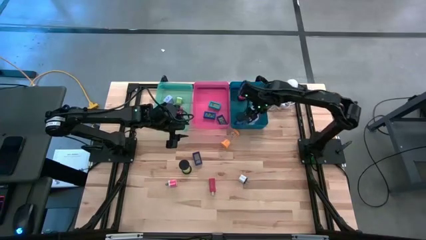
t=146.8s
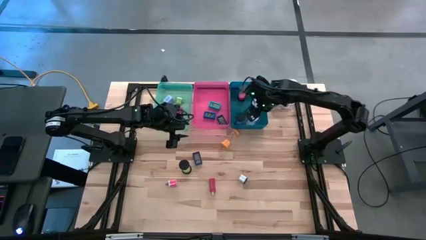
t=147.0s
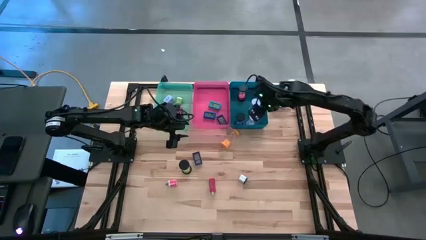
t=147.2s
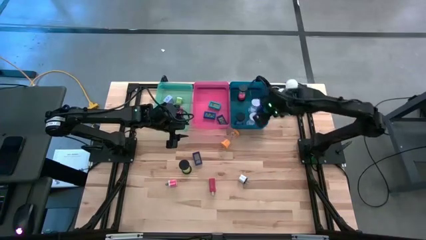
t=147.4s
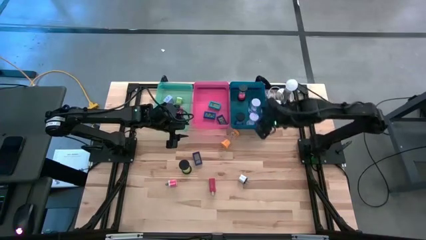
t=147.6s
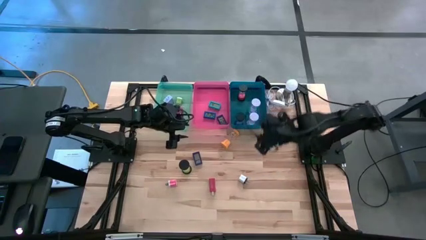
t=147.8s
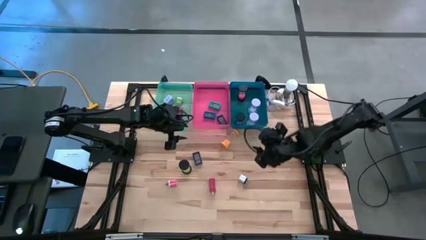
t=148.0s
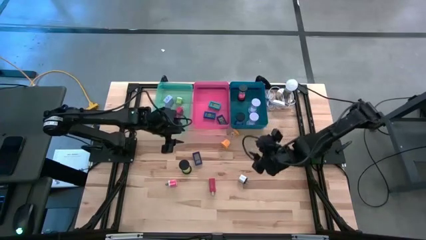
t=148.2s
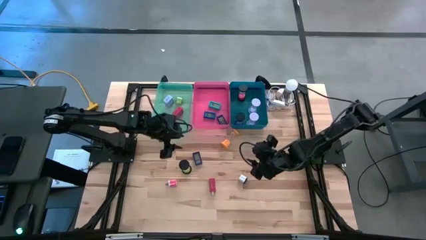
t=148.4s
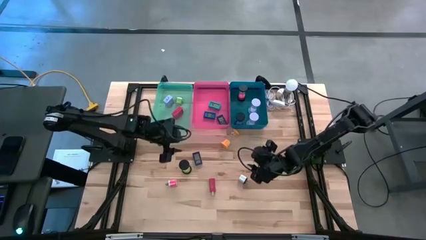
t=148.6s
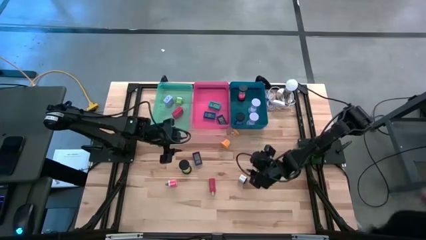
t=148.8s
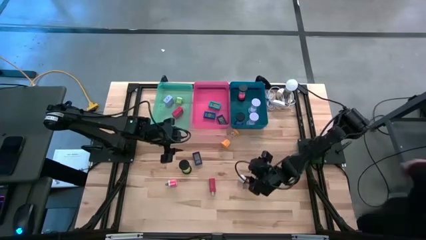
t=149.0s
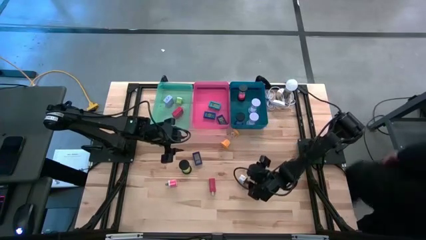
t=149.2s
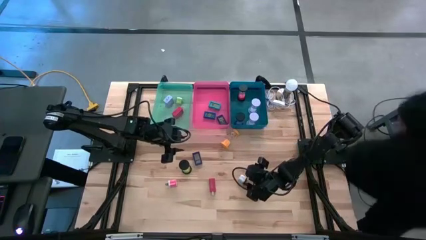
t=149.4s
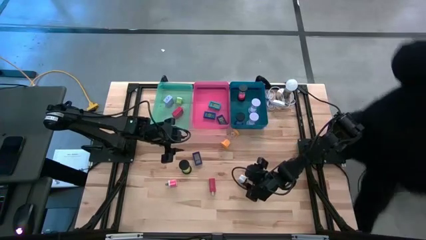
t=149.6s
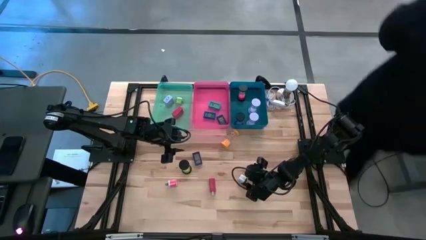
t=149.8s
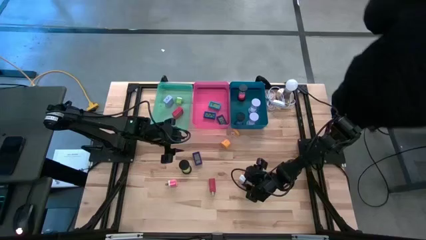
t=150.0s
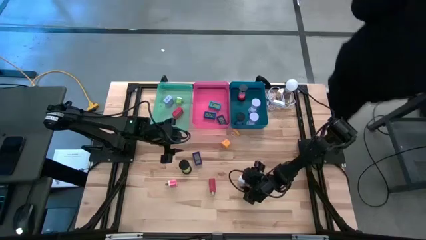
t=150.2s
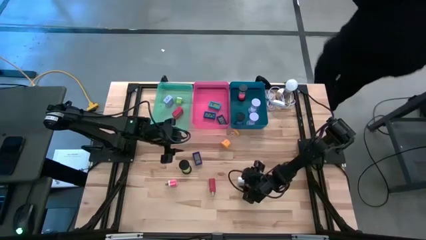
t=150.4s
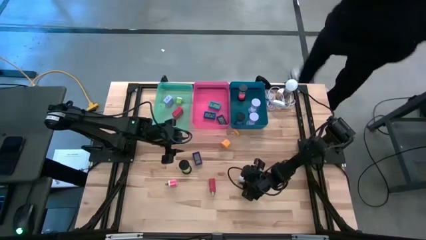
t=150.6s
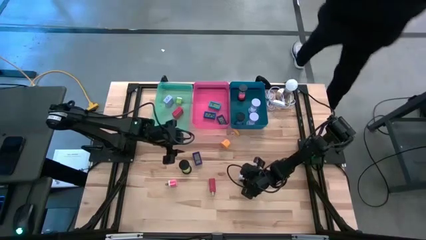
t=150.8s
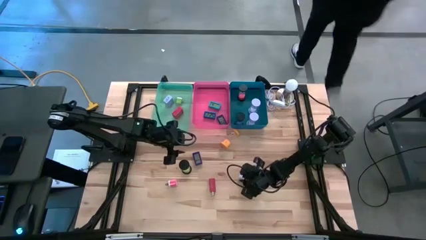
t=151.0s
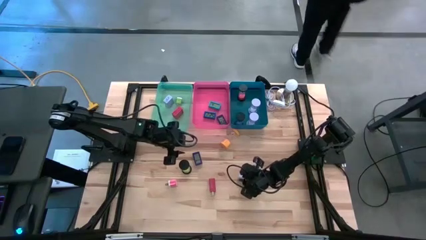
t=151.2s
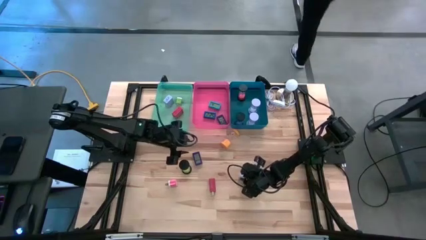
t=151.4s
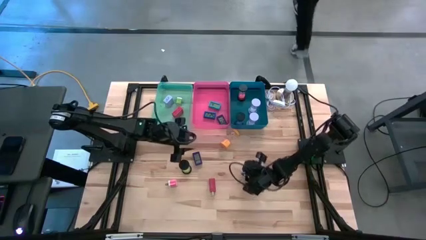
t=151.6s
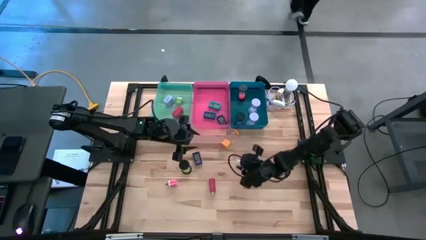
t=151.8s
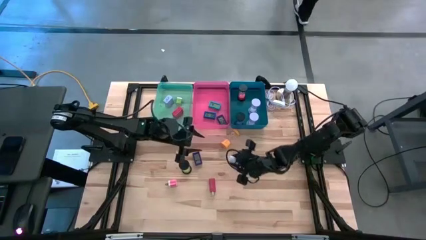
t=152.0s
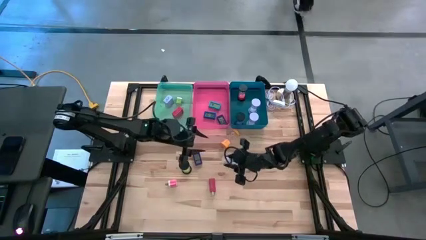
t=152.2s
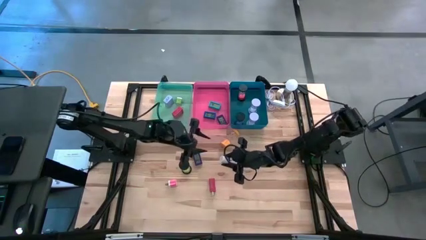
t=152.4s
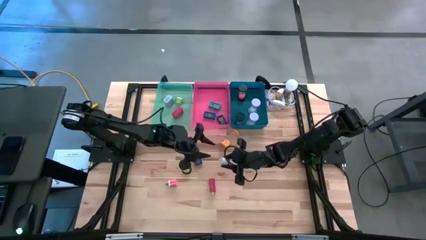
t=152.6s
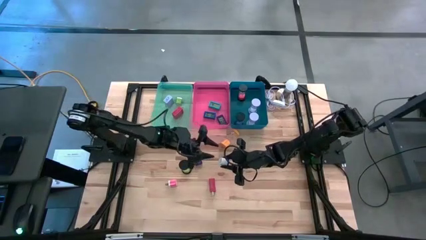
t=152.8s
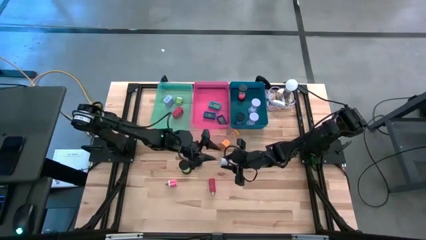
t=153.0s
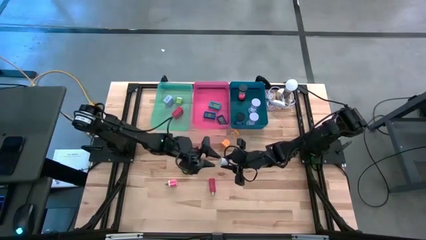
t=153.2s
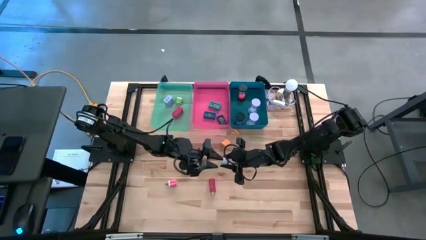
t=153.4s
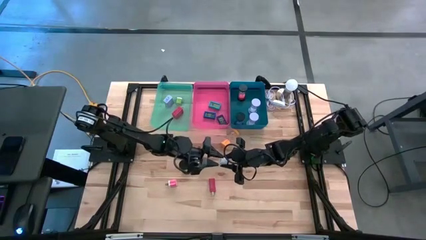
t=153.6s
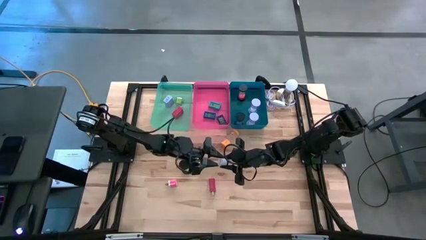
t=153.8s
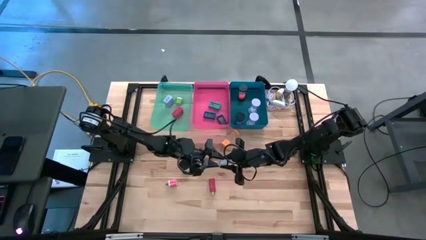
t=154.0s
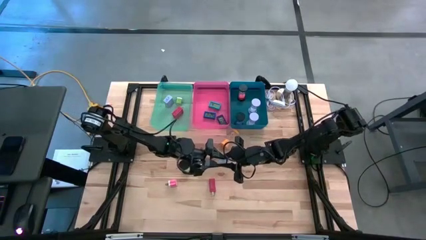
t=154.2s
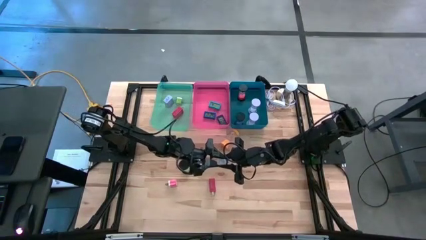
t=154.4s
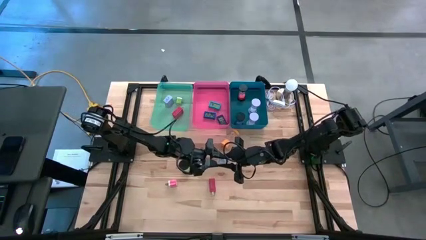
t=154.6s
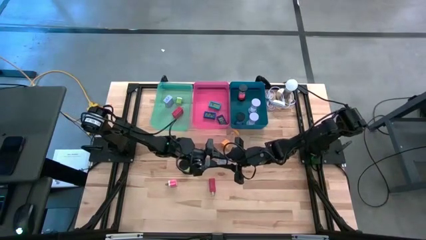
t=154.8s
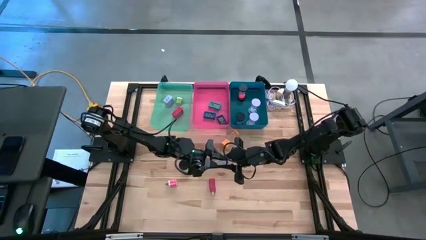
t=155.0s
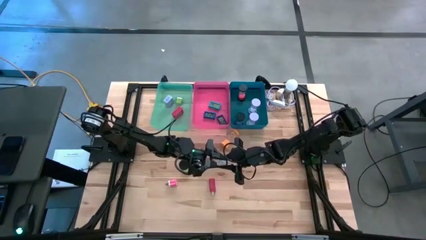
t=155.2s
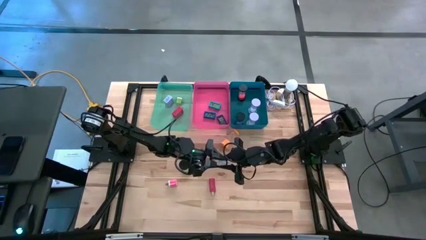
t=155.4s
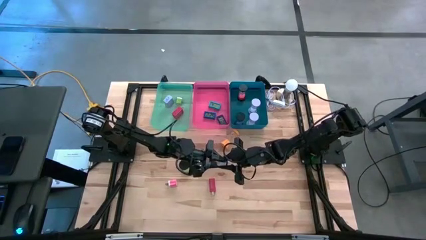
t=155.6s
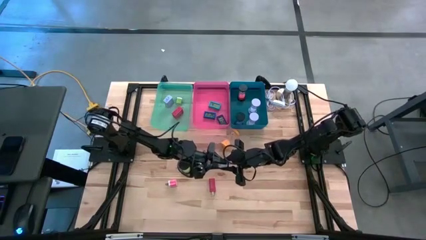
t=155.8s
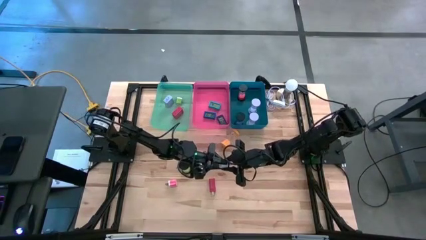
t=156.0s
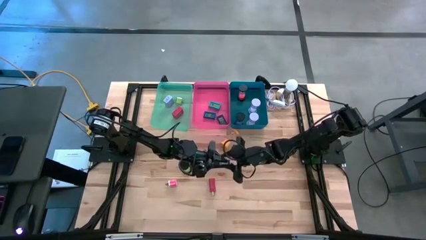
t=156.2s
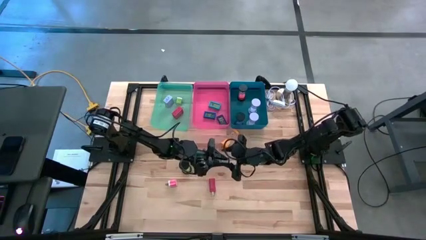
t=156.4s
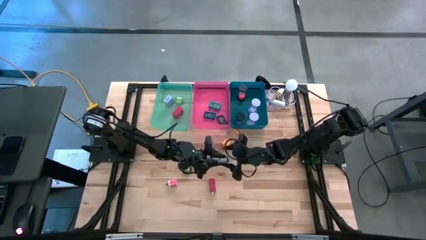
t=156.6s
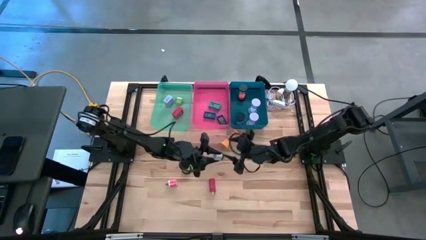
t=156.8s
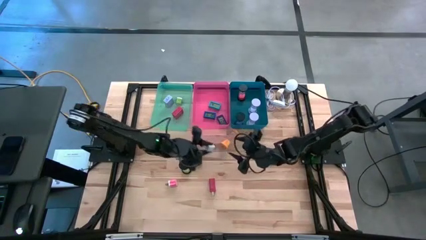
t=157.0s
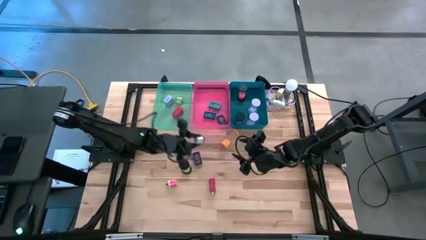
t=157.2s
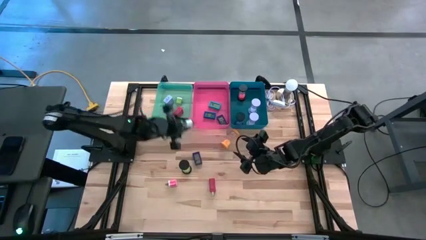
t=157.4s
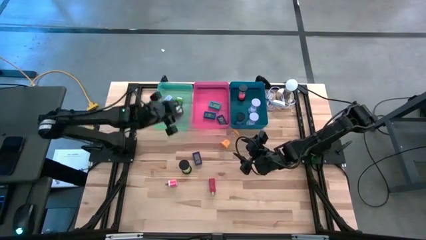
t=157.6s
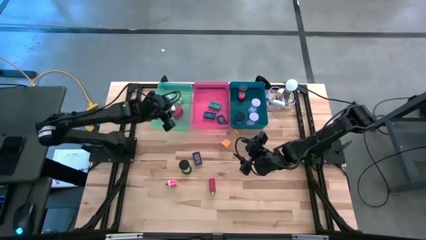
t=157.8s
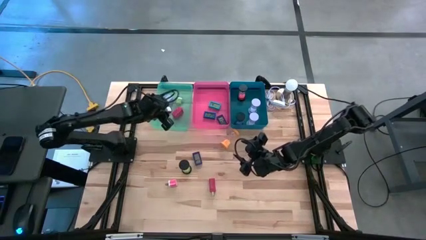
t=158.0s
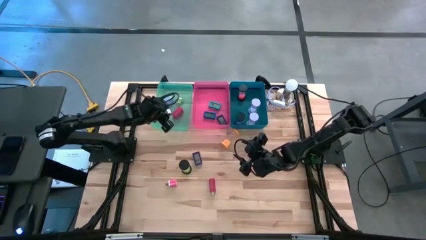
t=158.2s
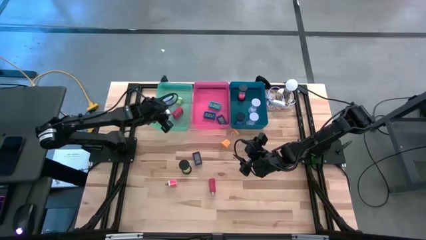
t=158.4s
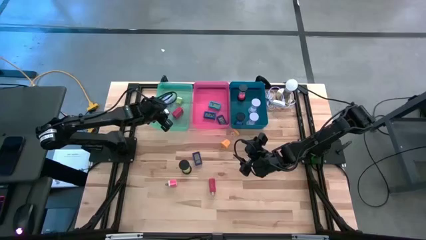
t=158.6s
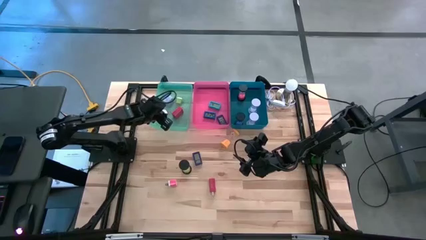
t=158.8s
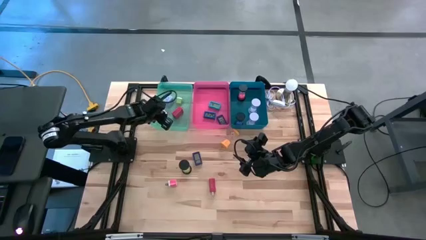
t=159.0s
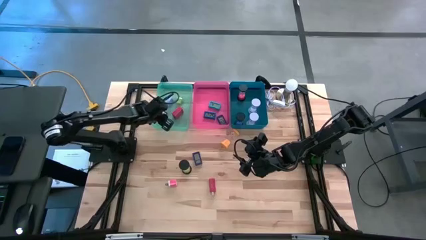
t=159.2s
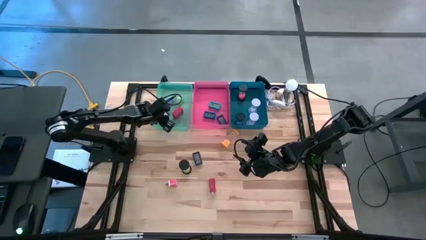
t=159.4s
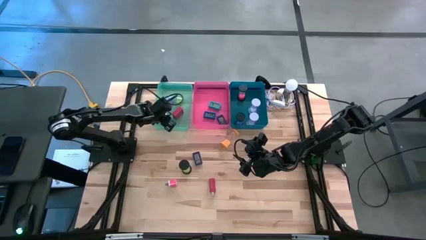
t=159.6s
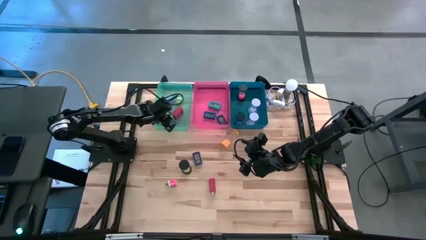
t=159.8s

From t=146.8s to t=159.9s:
Task: Pick & Place Office items
Put the white black adapter into the green bin

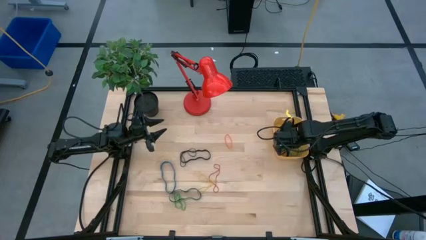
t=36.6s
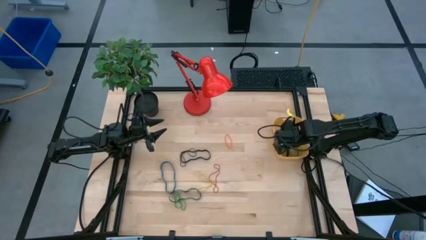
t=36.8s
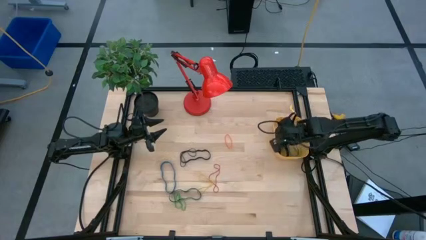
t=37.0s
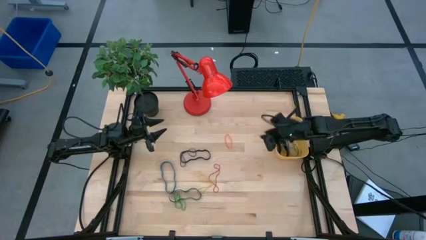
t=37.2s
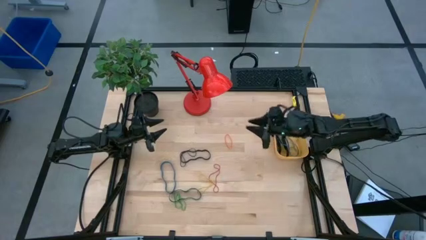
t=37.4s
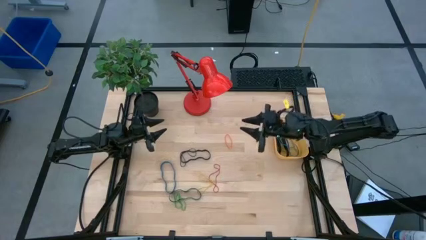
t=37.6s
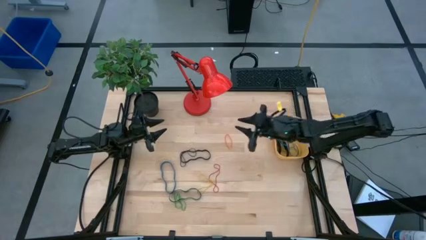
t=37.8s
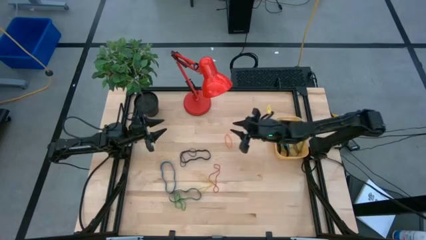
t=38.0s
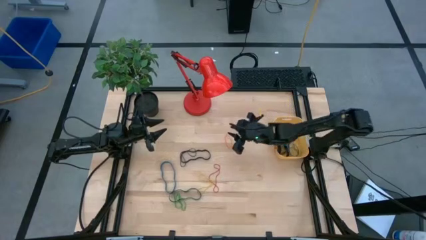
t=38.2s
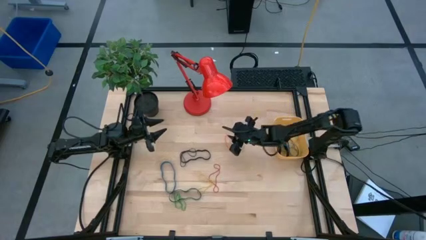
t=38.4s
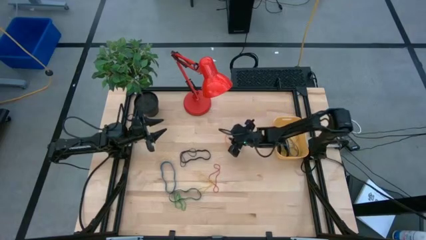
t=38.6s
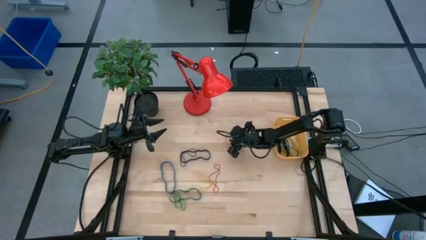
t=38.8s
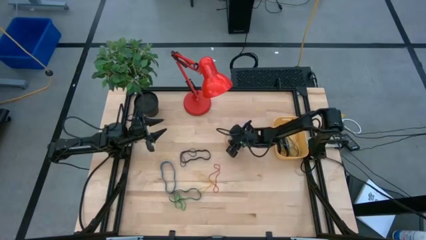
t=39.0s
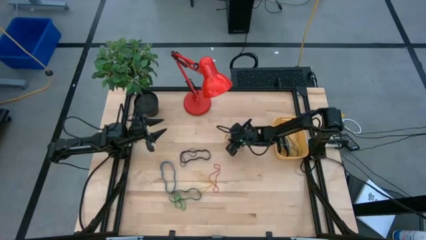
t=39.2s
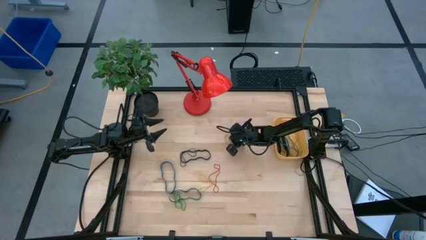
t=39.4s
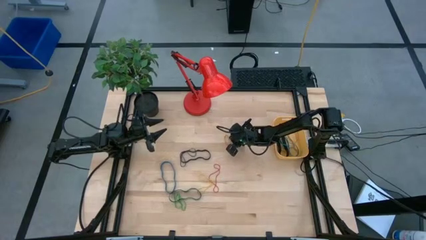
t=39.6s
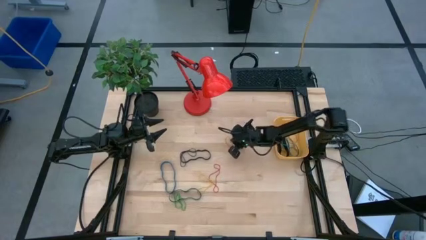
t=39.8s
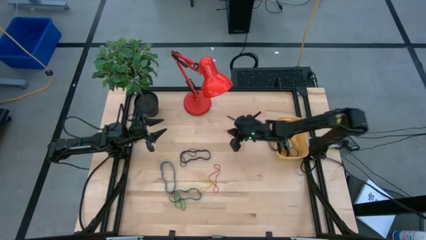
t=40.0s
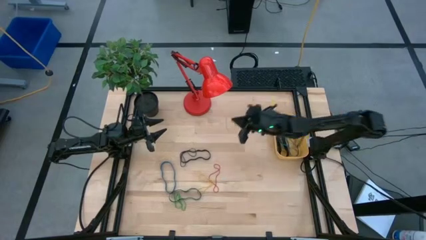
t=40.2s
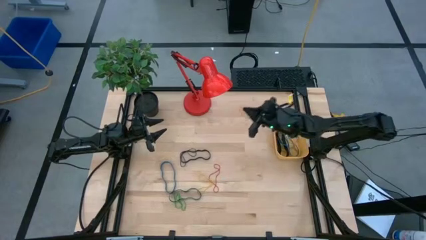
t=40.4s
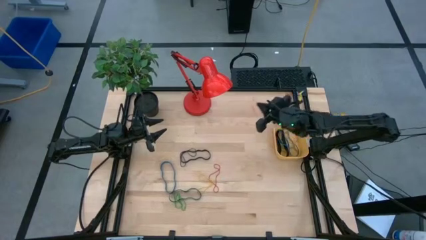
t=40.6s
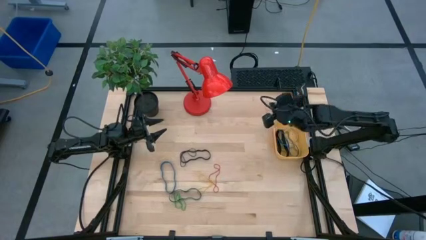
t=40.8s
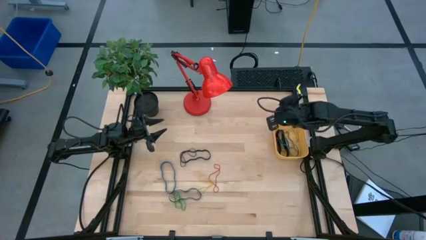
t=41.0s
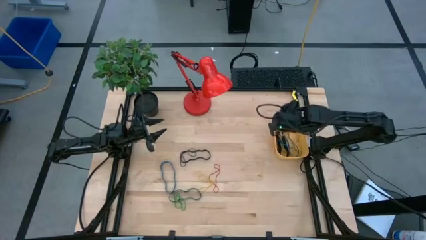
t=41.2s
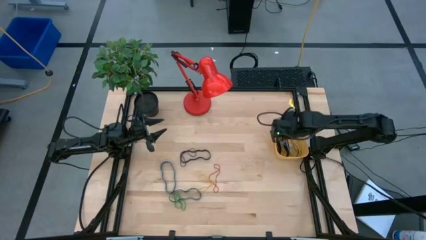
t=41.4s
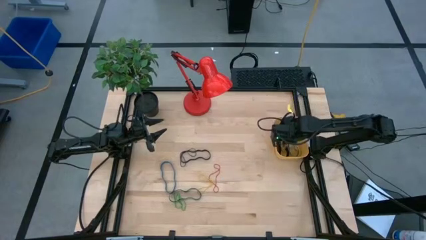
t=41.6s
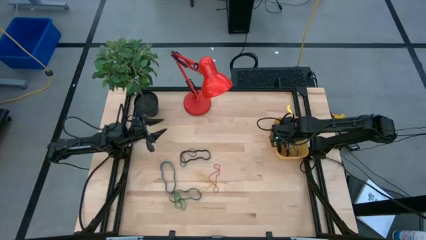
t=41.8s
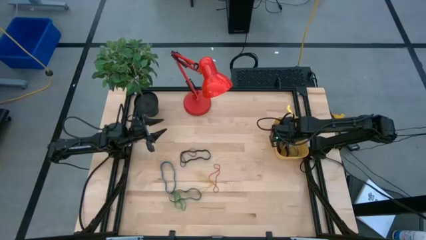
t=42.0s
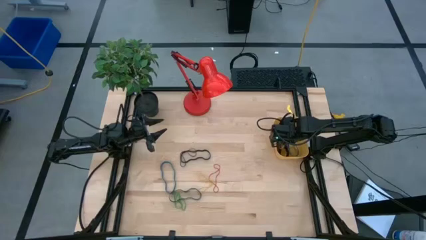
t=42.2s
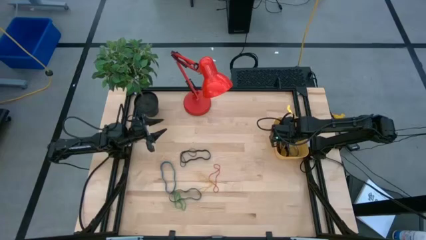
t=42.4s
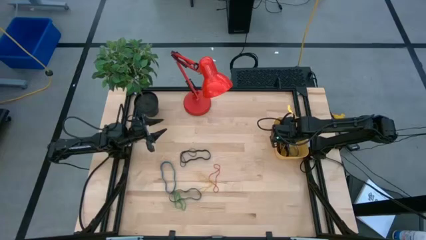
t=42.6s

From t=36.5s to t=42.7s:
Task: Pick and place rubber bands into bin
Put the orange rubber band into the yellow bin
